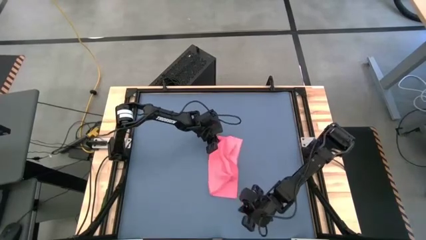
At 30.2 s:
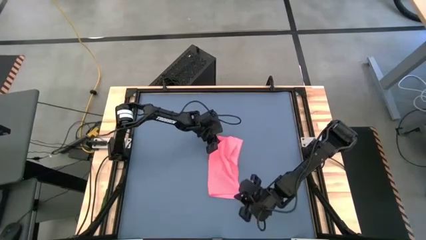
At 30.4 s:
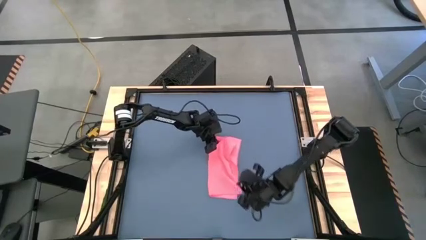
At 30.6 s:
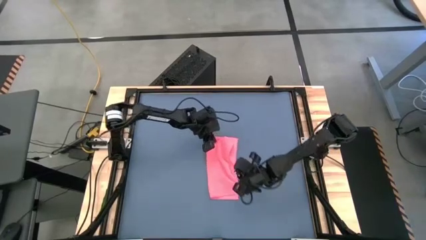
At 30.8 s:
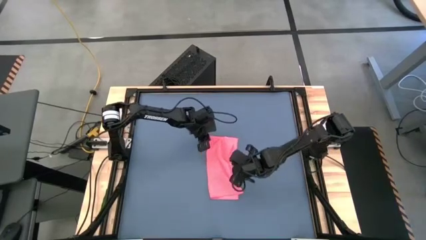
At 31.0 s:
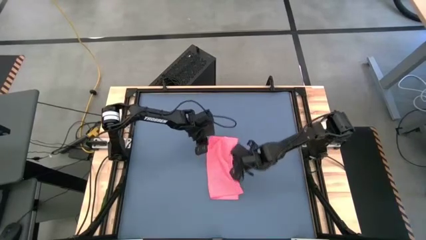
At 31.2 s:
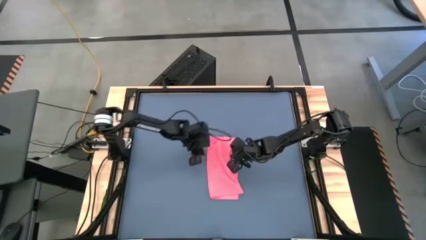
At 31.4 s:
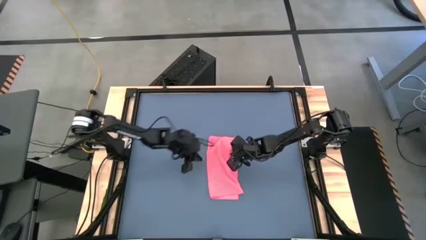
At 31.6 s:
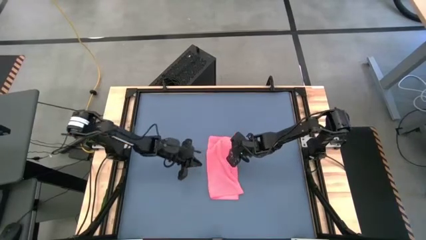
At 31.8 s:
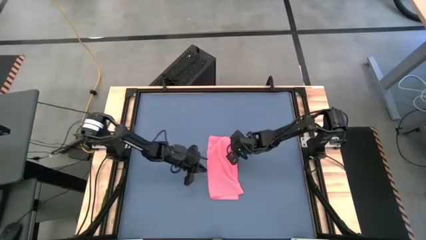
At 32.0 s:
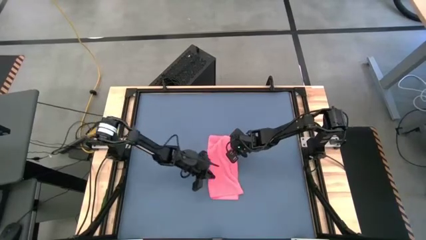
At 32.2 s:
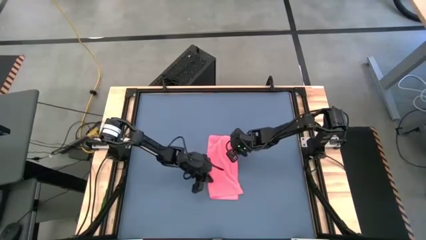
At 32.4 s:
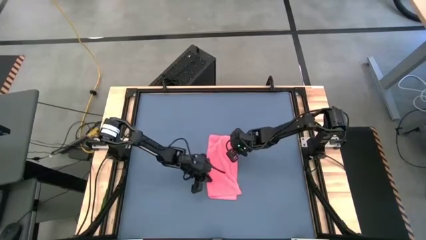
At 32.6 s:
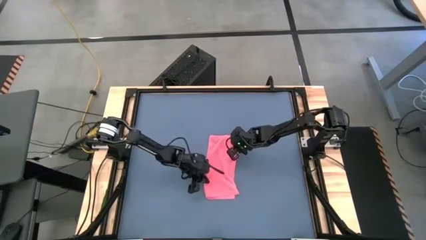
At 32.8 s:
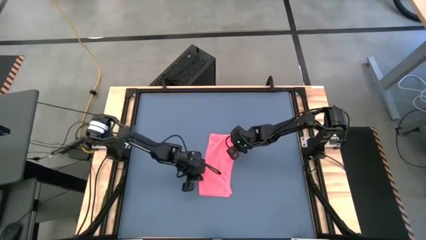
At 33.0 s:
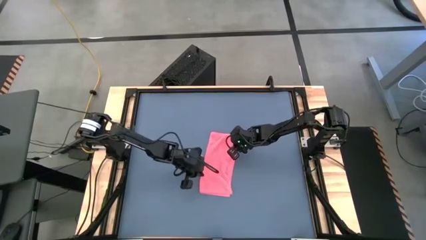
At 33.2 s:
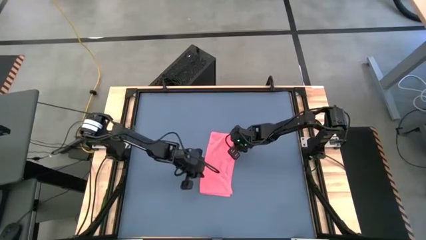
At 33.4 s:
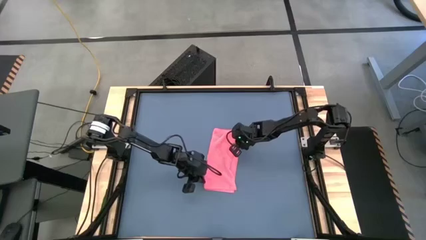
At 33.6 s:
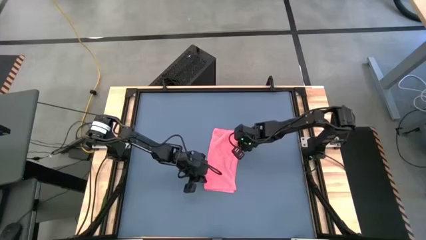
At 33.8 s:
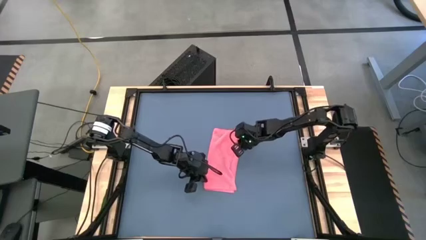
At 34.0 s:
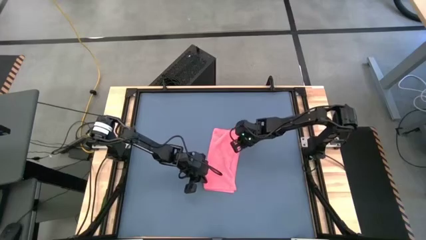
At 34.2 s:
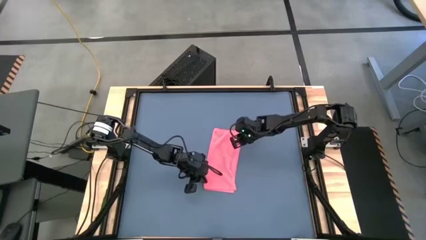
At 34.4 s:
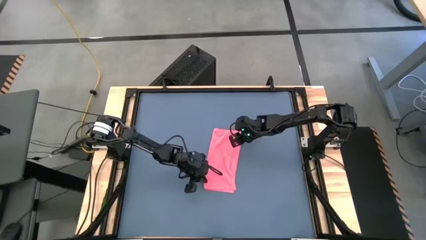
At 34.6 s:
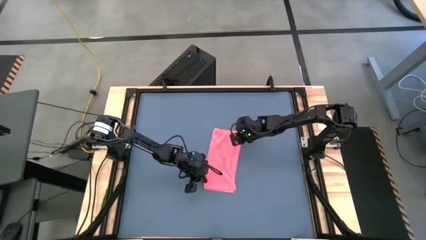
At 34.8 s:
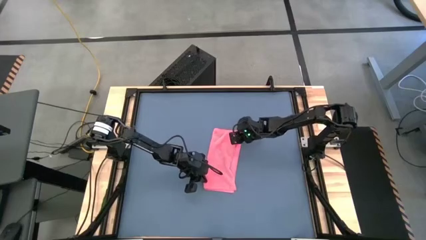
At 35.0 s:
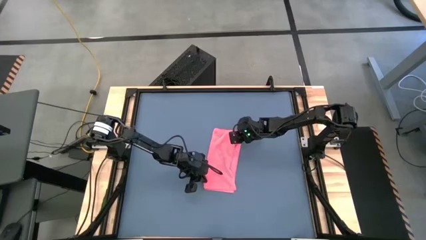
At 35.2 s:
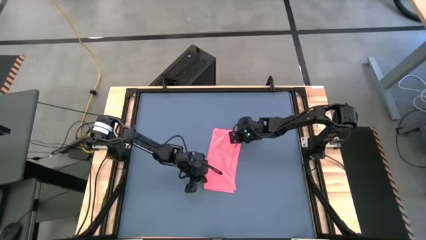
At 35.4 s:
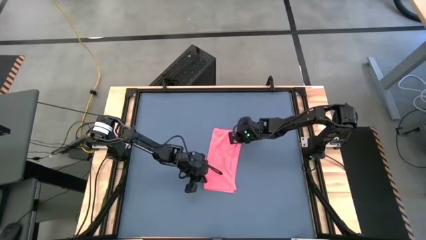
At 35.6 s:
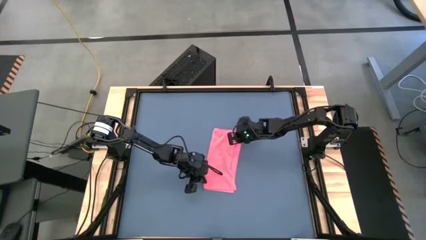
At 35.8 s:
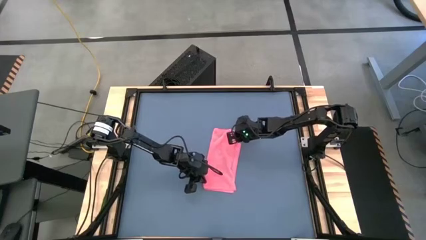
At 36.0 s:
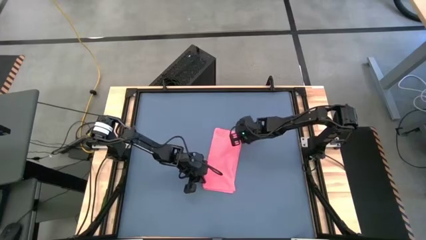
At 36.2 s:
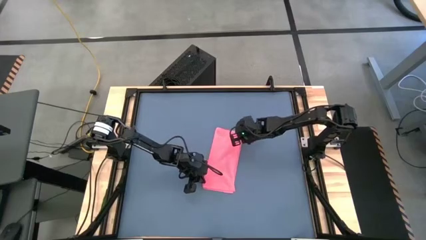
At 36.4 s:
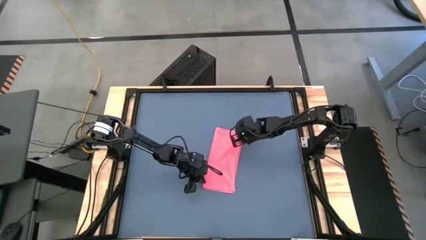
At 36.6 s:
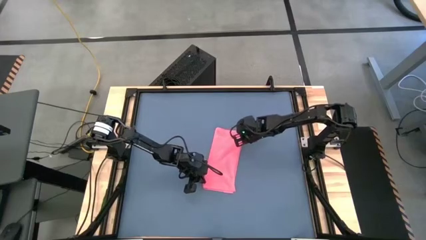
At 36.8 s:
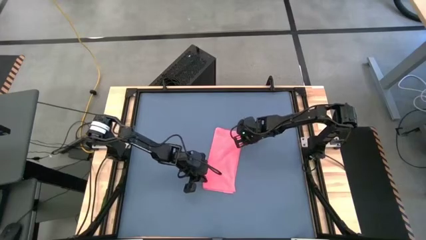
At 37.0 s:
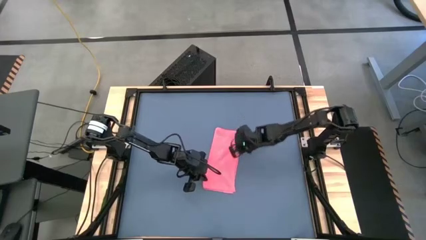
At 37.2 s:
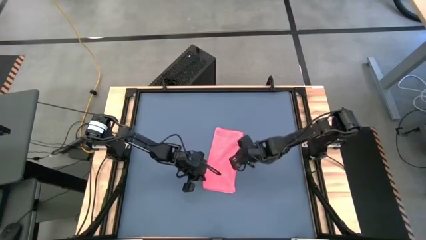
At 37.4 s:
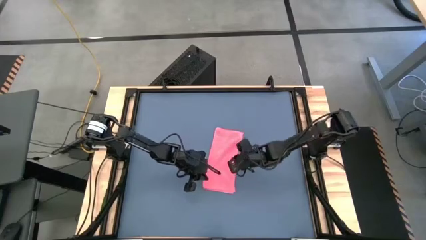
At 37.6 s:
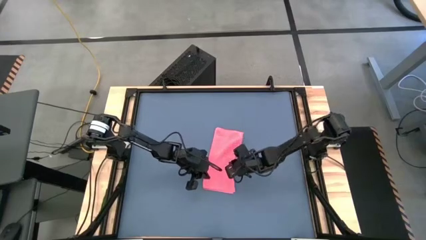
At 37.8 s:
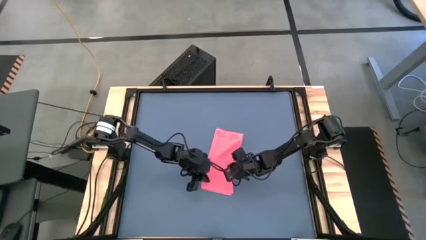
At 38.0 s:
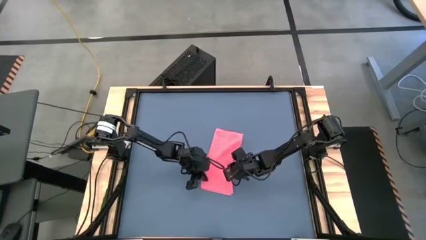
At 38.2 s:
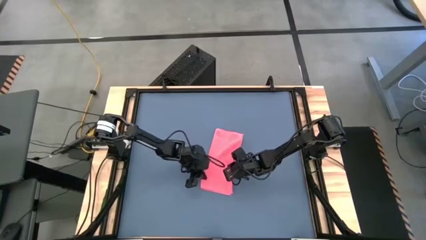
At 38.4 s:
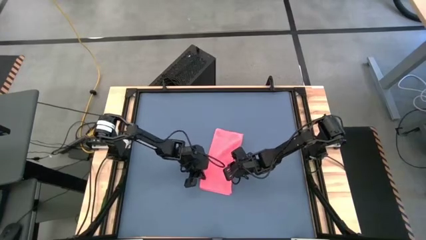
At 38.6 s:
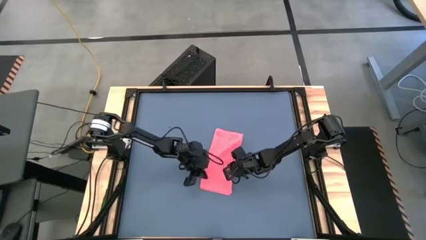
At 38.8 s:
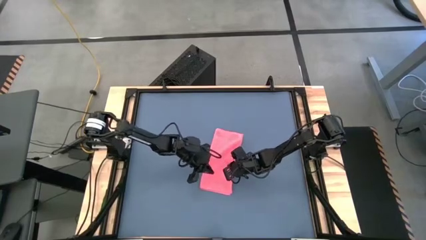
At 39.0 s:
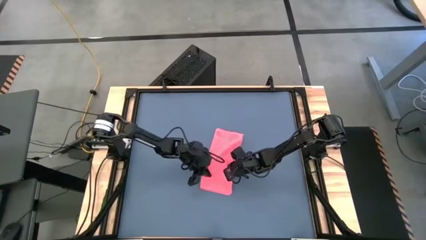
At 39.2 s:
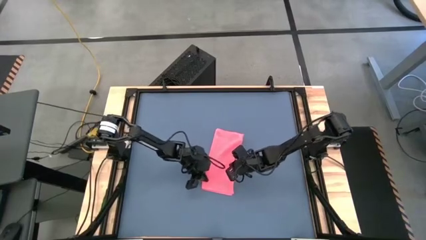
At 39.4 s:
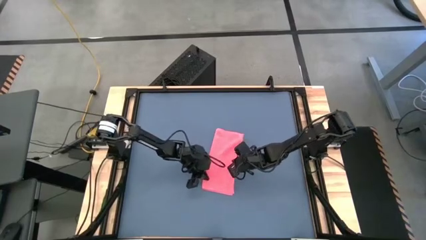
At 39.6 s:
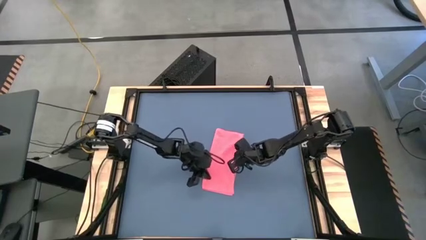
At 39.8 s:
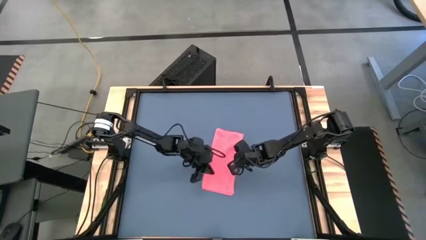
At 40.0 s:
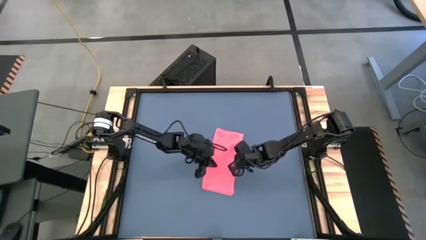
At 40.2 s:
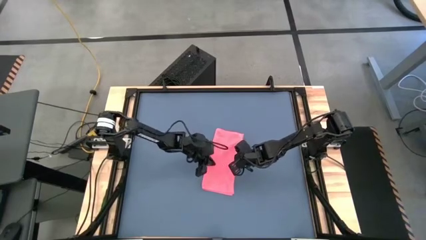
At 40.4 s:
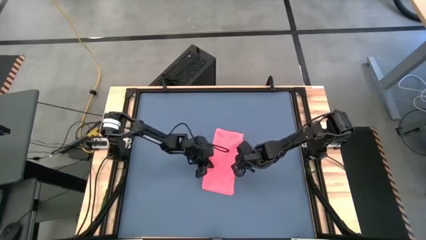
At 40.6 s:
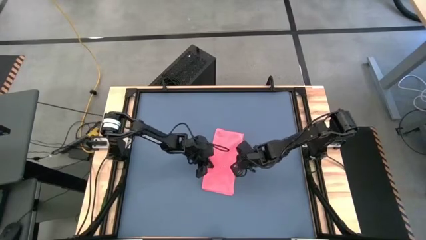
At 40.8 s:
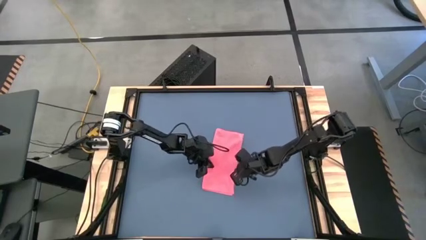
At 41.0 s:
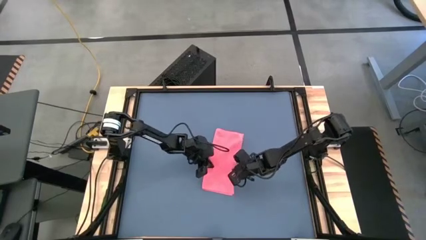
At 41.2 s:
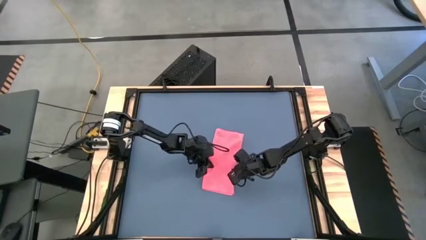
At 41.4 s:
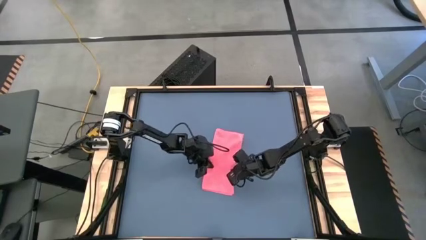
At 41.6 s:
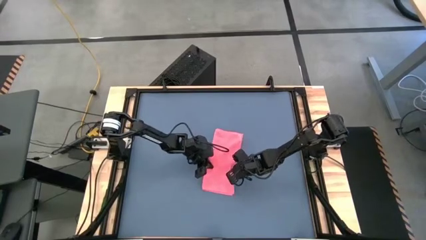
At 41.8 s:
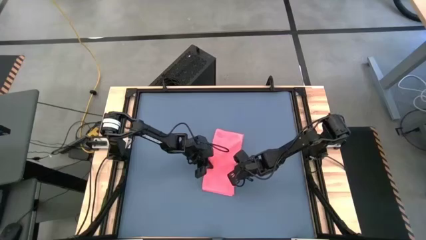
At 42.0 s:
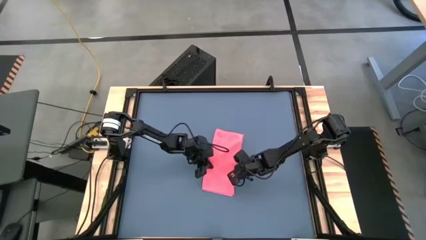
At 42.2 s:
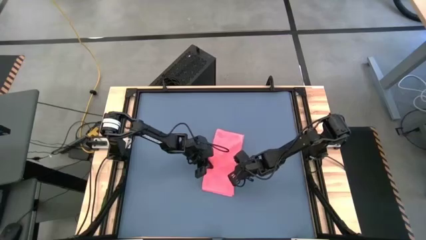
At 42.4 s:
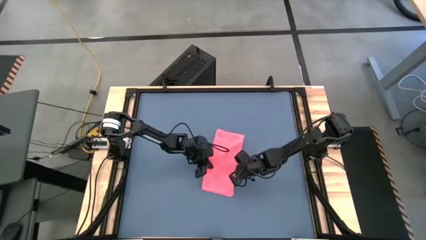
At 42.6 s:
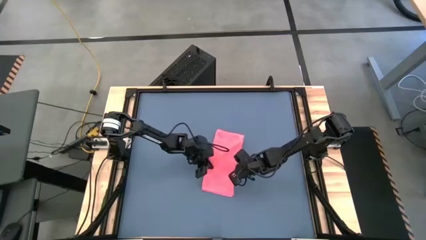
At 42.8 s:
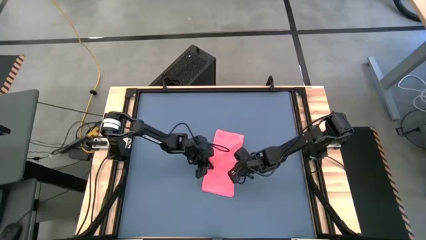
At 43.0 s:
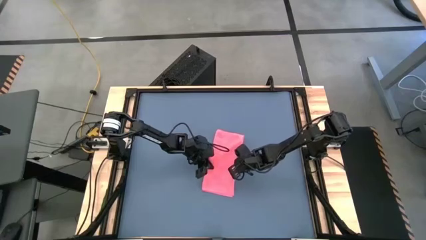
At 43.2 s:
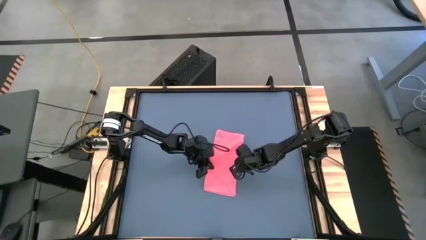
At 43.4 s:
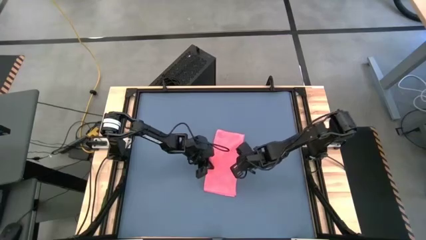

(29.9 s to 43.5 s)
Task: Roll towel
Fold the pink towel
